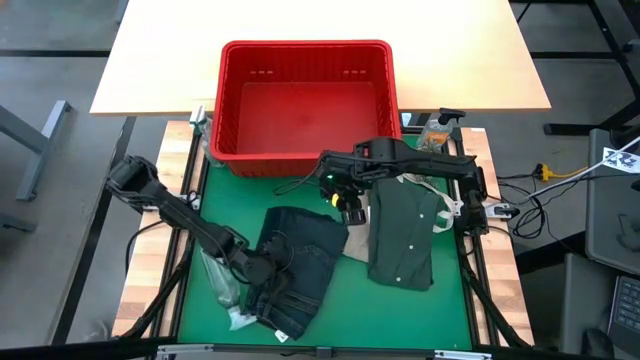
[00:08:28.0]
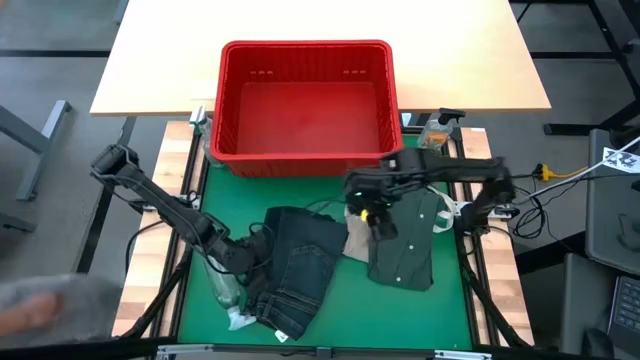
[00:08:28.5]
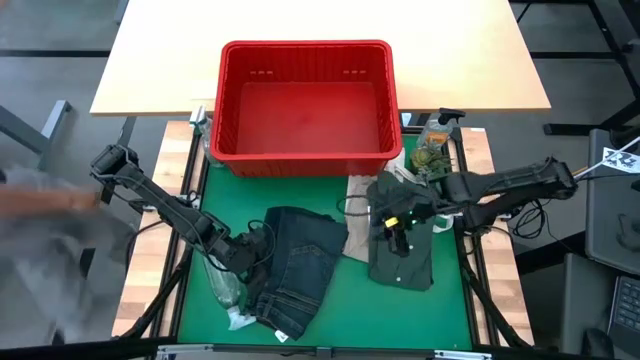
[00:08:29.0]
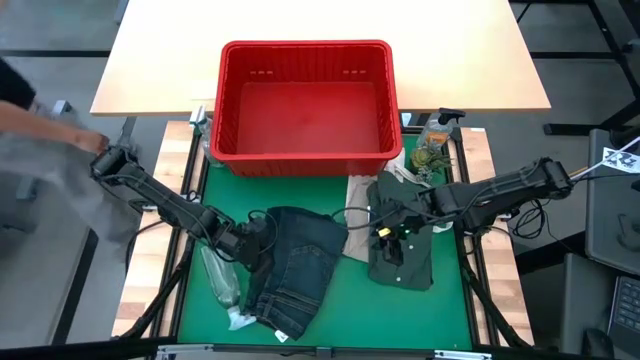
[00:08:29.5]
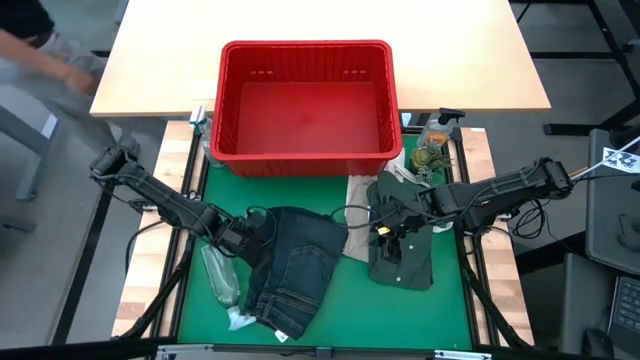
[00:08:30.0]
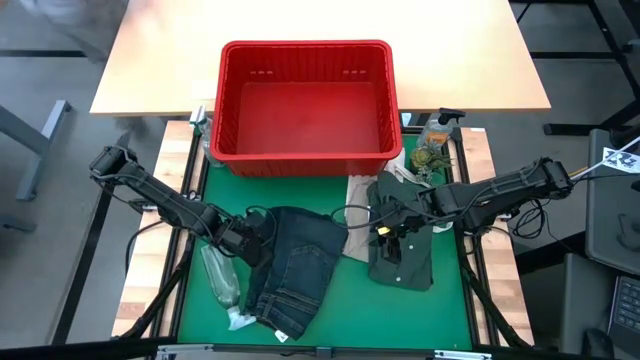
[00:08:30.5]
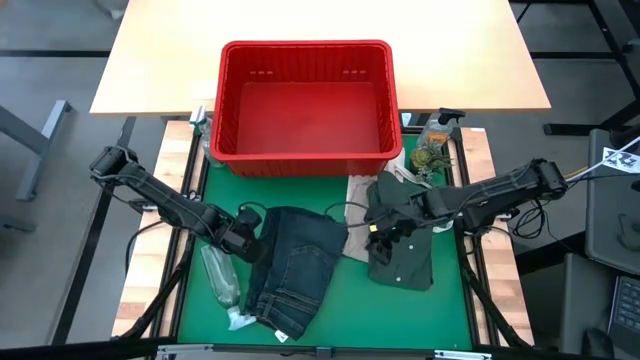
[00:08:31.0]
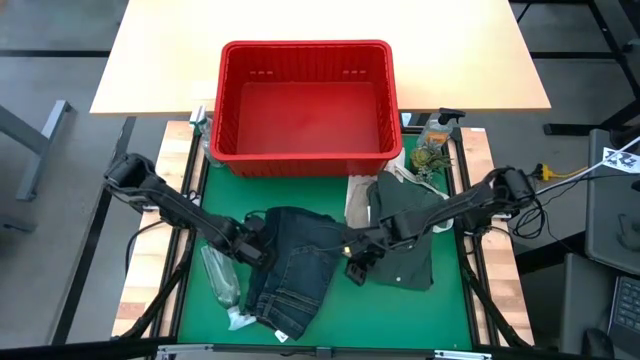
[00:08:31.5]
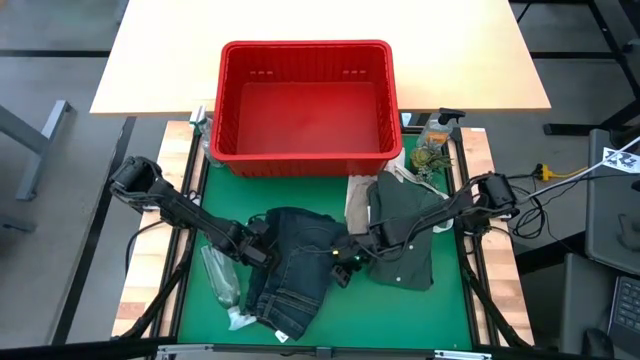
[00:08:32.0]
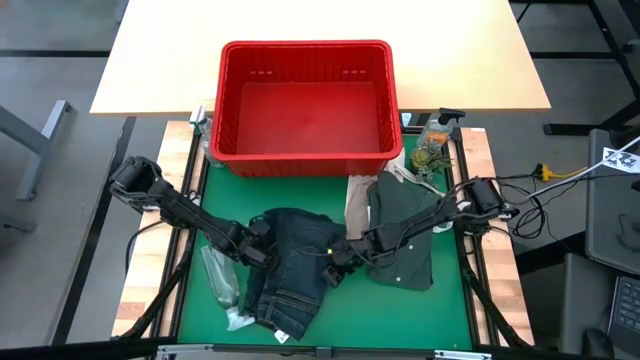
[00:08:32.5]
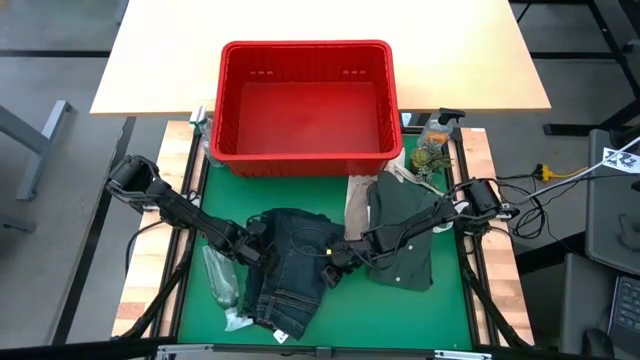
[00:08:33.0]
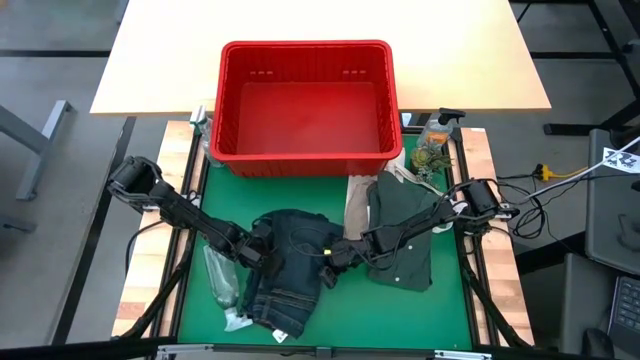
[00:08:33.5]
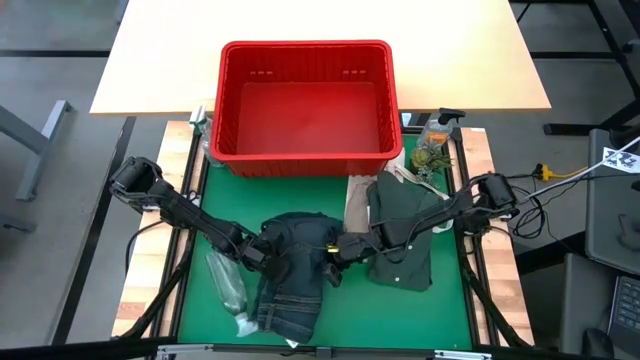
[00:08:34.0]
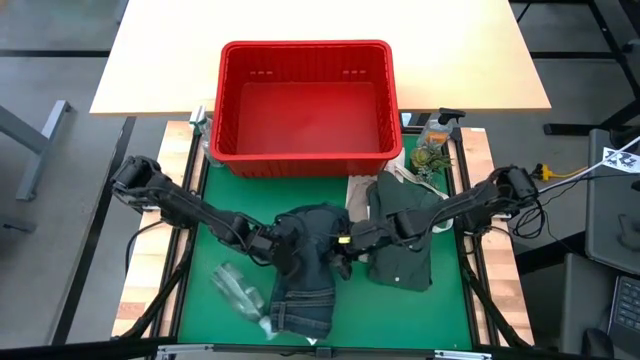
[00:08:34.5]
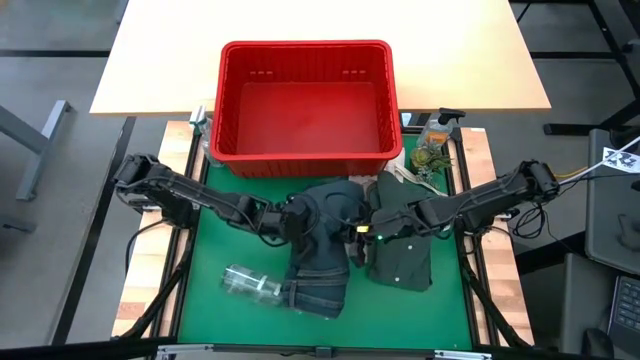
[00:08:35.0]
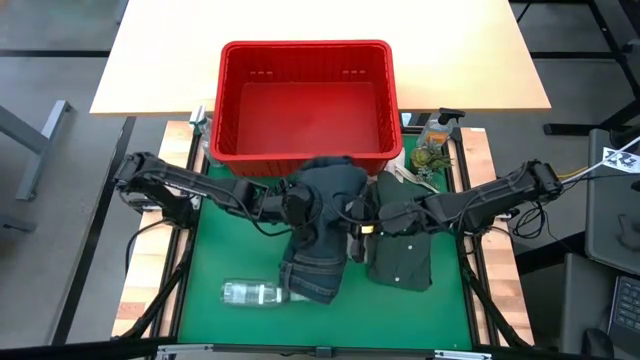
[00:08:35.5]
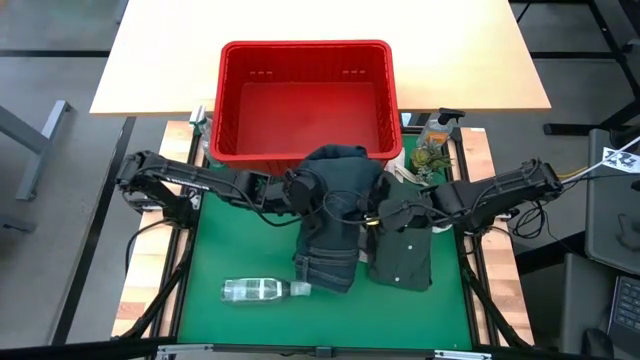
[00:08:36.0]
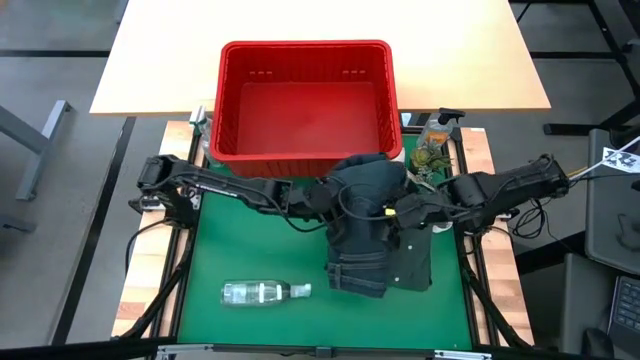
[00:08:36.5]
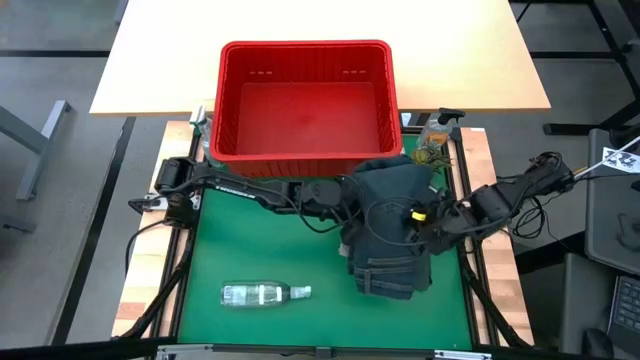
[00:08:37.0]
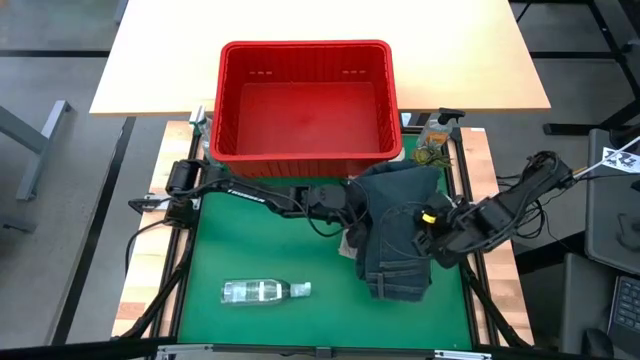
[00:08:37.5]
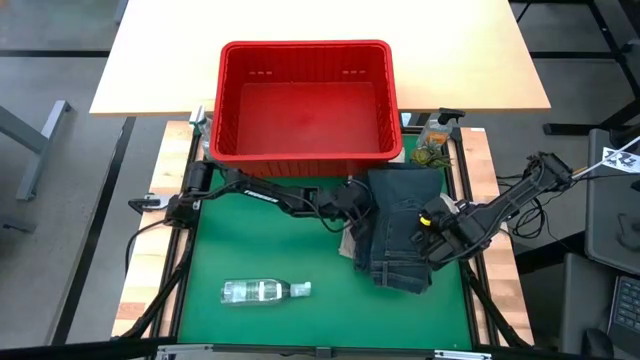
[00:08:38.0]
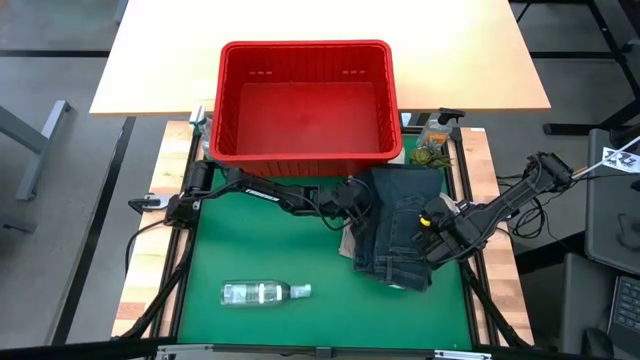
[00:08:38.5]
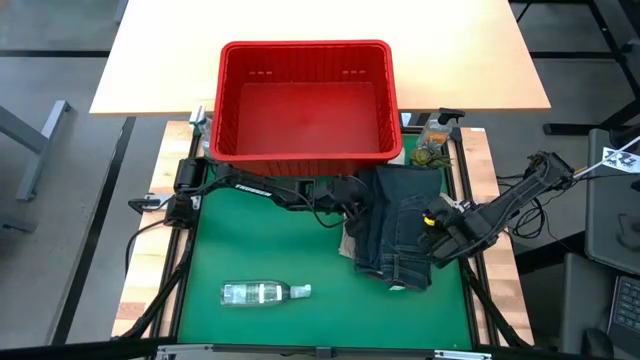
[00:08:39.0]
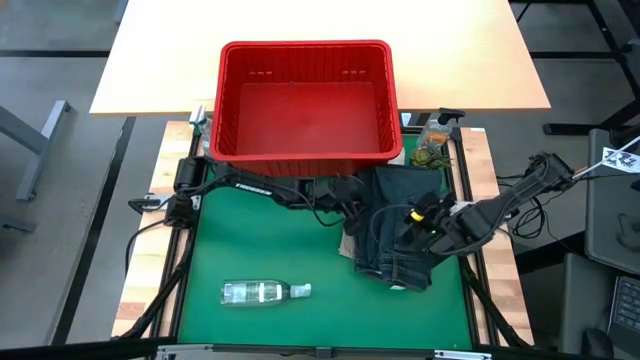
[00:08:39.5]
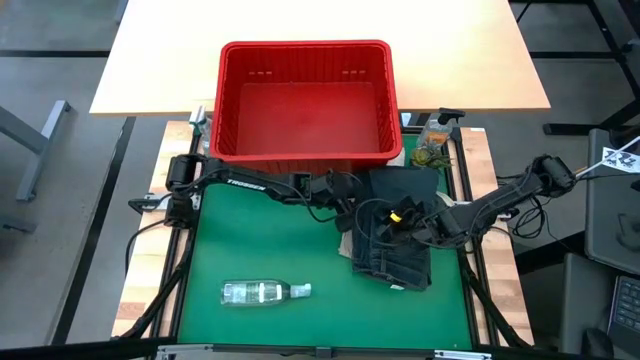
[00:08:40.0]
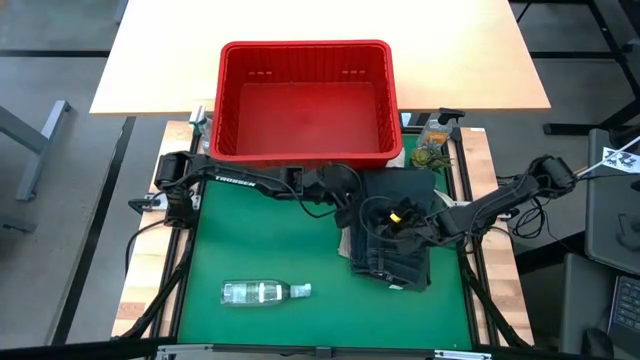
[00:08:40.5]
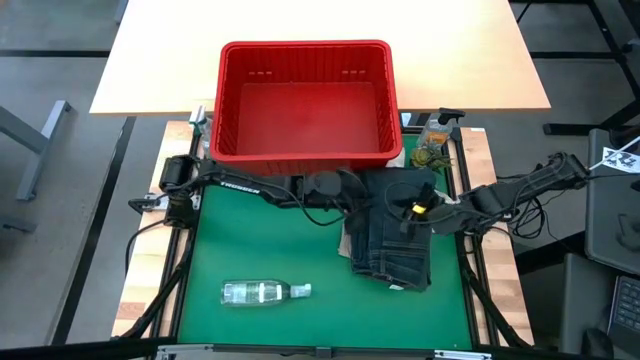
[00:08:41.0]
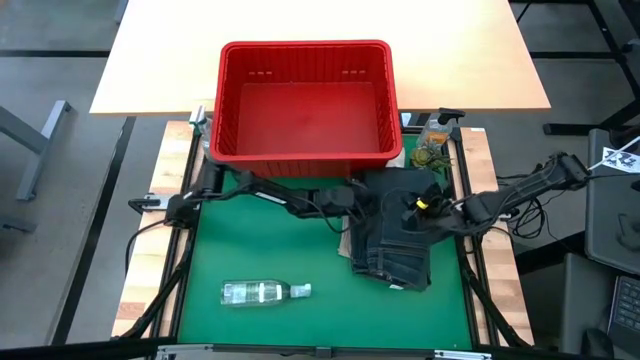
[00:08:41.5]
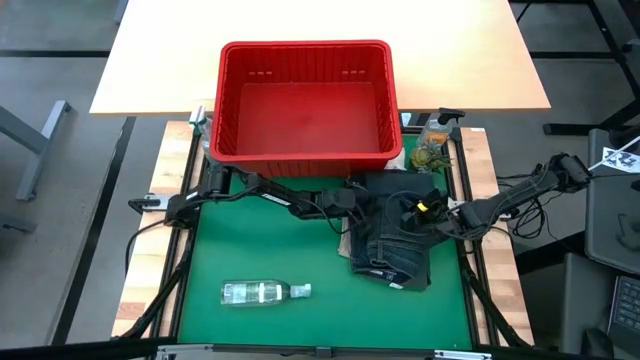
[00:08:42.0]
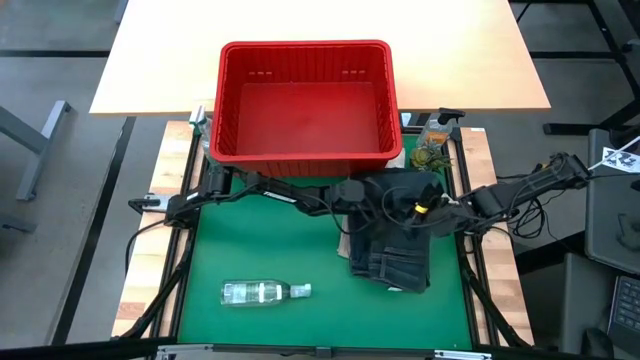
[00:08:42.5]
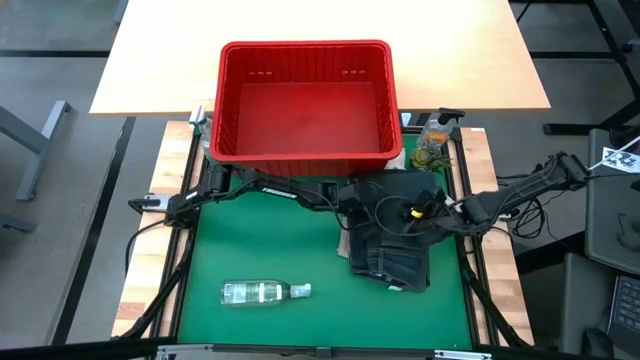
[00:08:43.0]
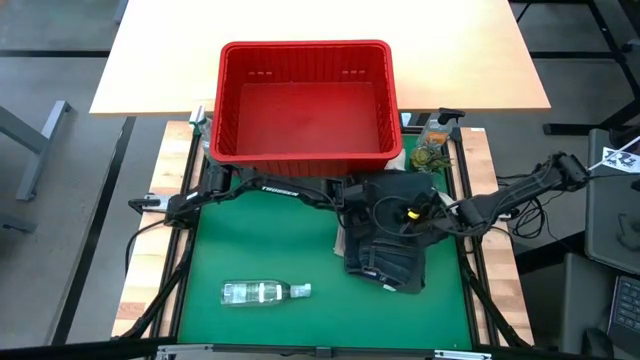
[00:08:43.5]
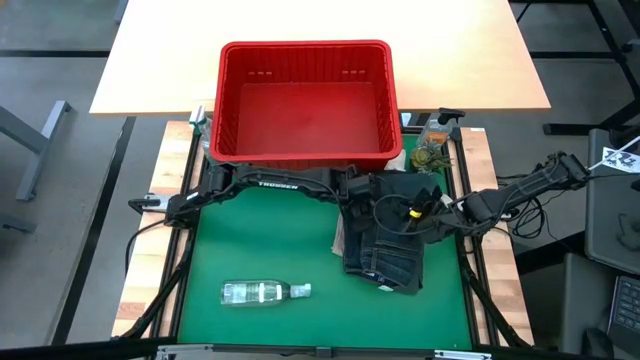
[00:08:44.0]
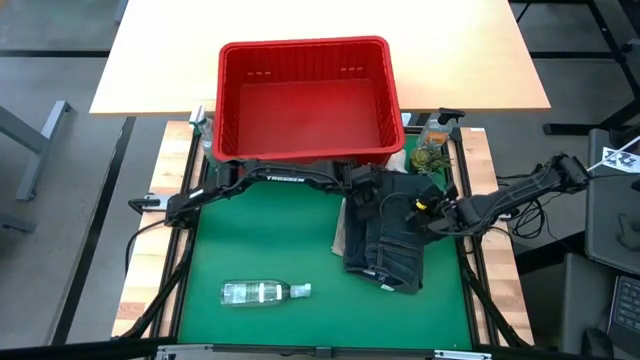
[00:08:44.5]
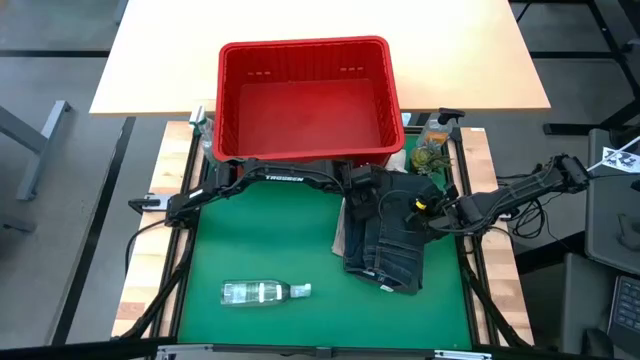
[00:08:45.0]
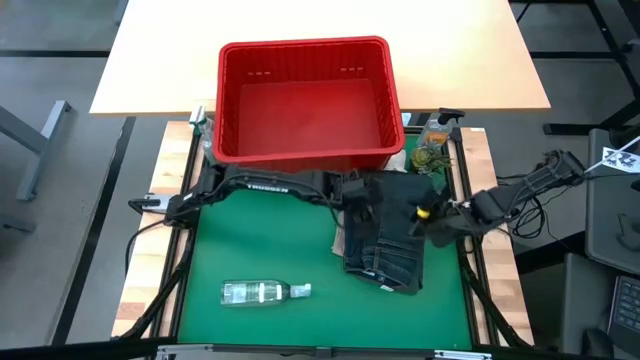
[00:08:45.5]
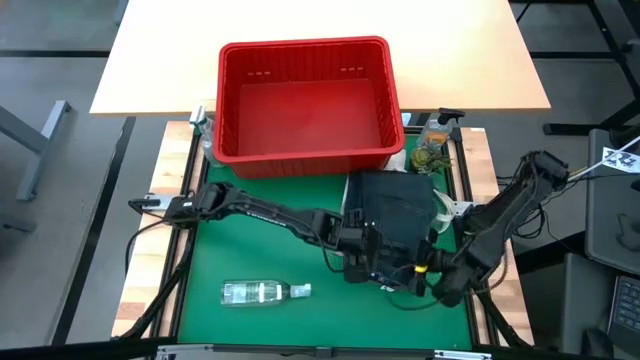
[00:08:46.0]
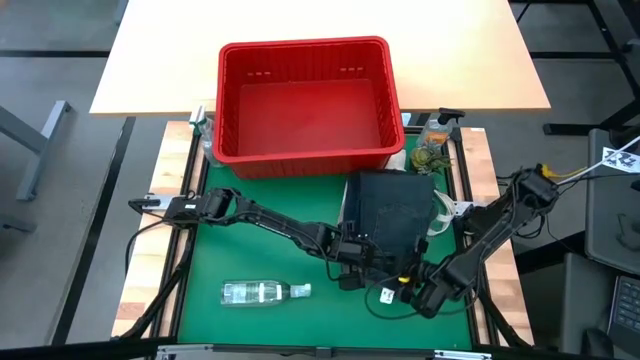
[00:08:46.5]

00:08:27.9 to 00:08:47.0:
Task: Fold laundry
Stack the folded blue pants on top of the folded green polo shirt
